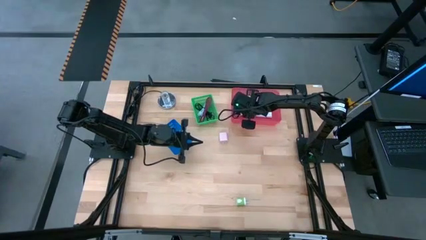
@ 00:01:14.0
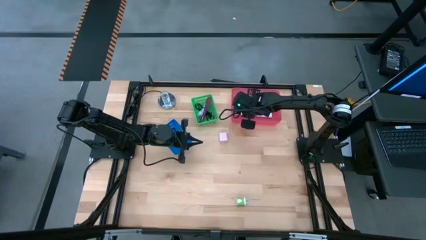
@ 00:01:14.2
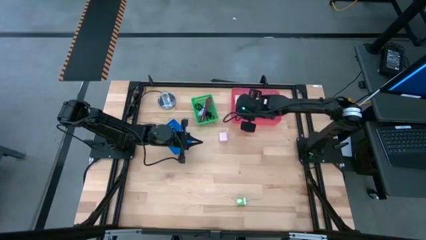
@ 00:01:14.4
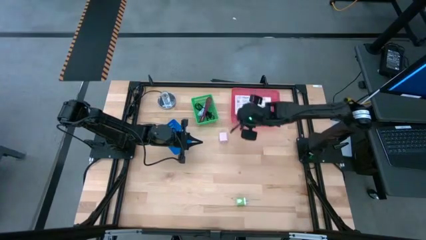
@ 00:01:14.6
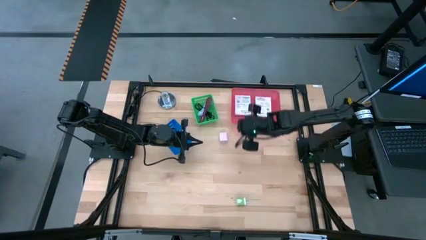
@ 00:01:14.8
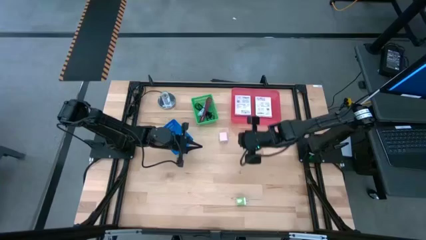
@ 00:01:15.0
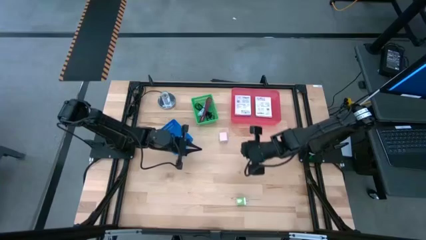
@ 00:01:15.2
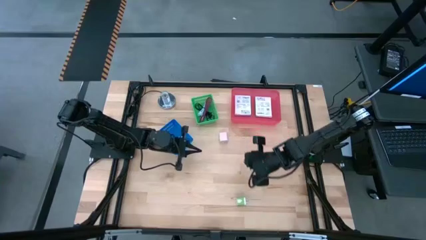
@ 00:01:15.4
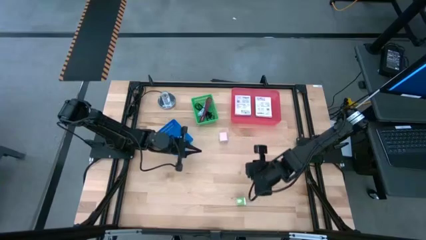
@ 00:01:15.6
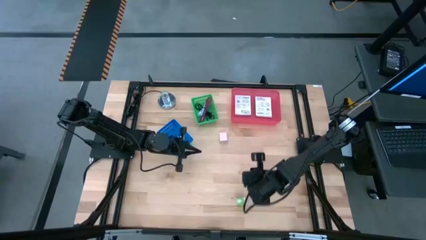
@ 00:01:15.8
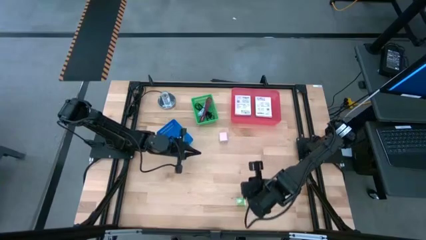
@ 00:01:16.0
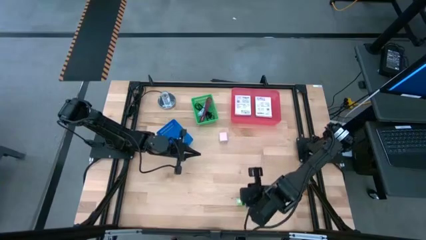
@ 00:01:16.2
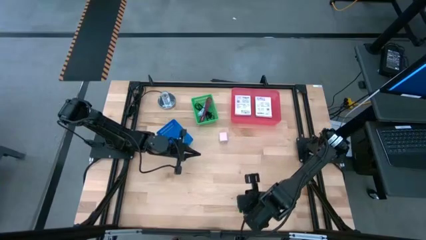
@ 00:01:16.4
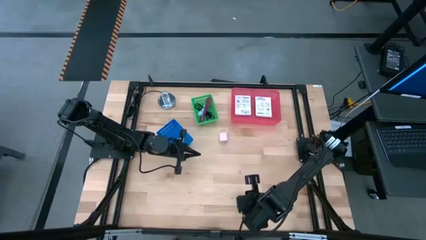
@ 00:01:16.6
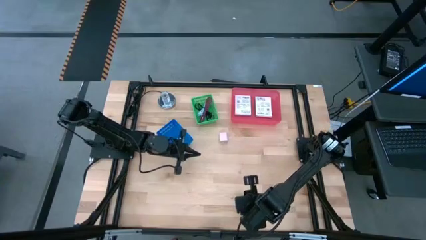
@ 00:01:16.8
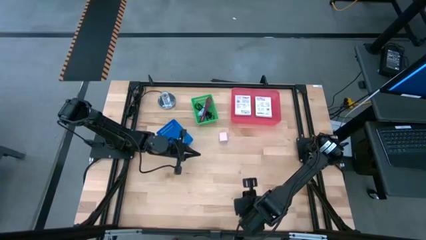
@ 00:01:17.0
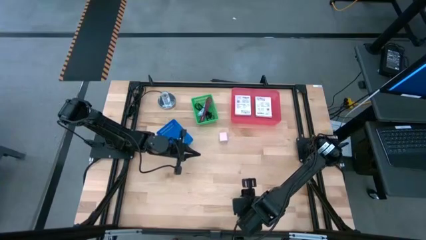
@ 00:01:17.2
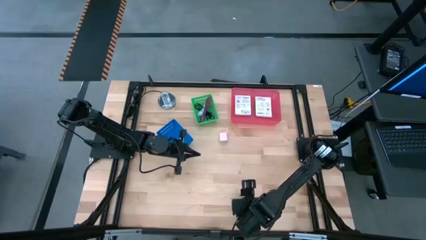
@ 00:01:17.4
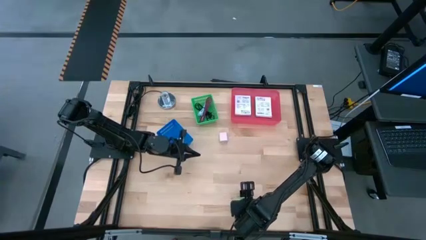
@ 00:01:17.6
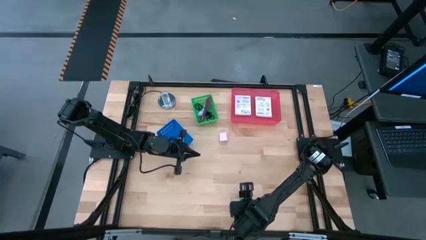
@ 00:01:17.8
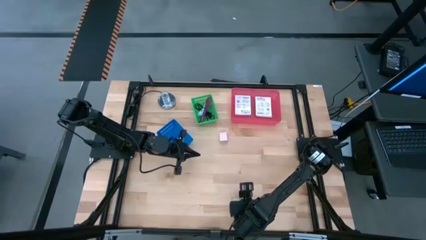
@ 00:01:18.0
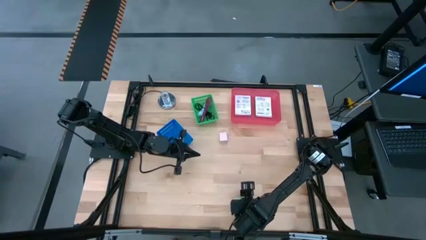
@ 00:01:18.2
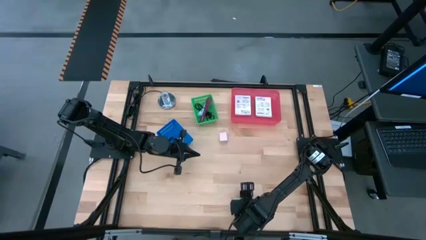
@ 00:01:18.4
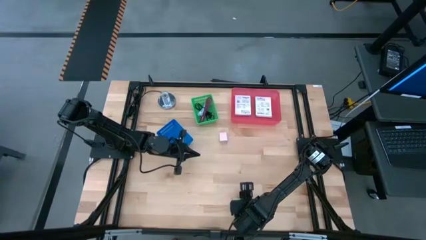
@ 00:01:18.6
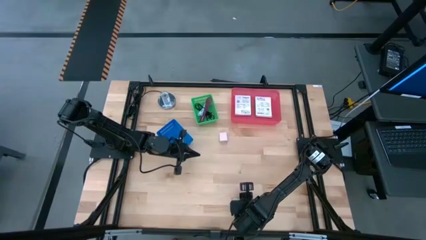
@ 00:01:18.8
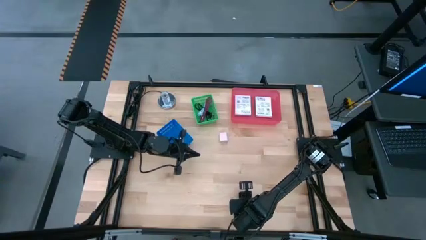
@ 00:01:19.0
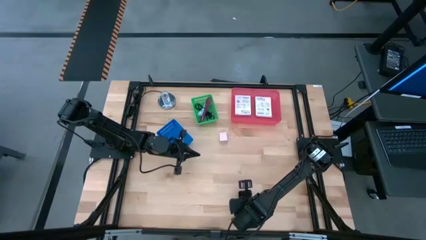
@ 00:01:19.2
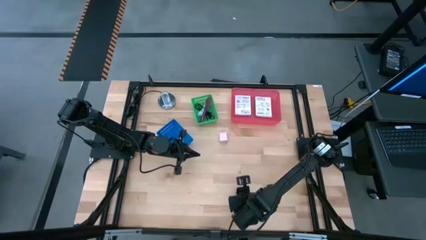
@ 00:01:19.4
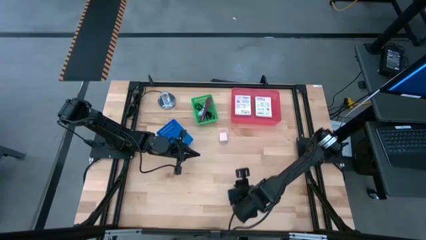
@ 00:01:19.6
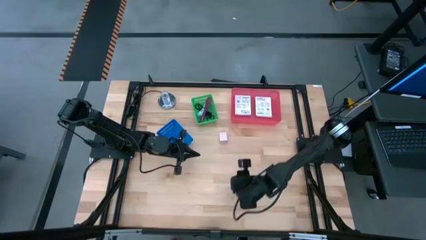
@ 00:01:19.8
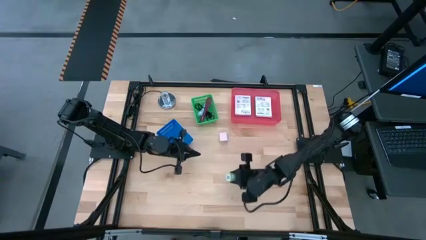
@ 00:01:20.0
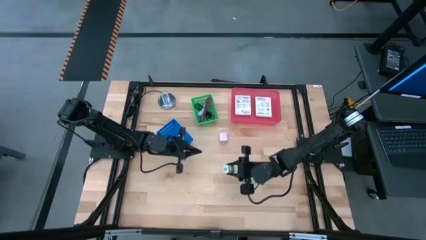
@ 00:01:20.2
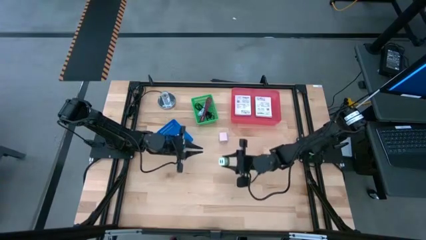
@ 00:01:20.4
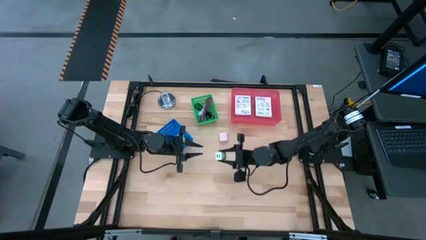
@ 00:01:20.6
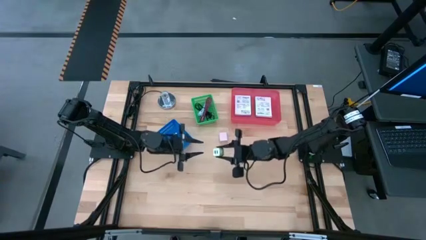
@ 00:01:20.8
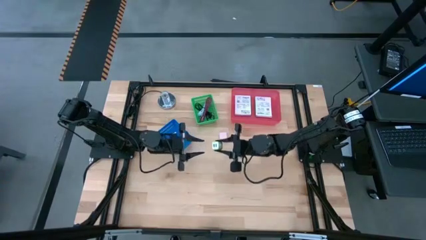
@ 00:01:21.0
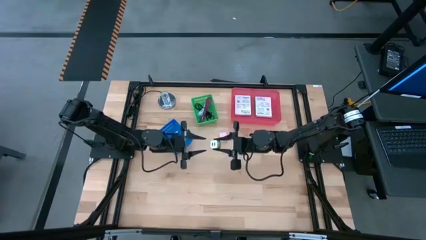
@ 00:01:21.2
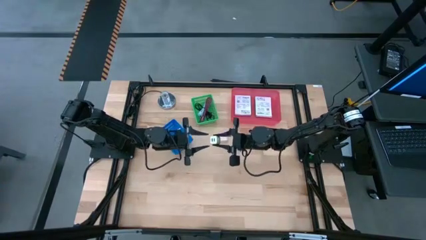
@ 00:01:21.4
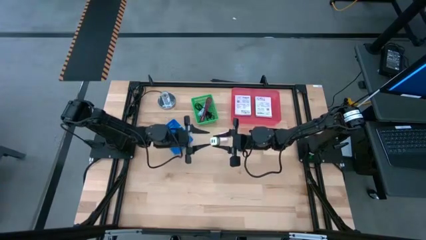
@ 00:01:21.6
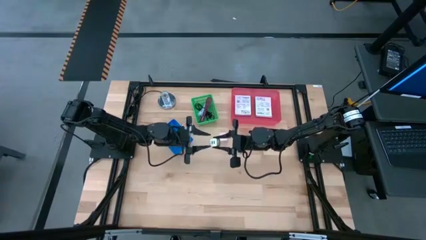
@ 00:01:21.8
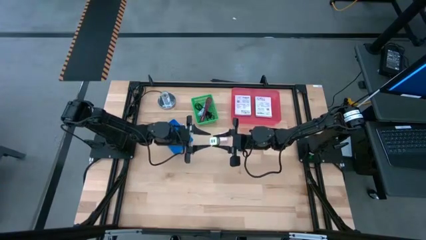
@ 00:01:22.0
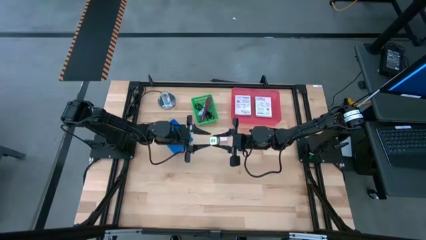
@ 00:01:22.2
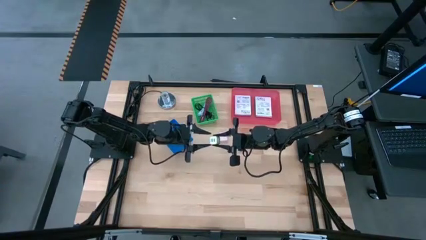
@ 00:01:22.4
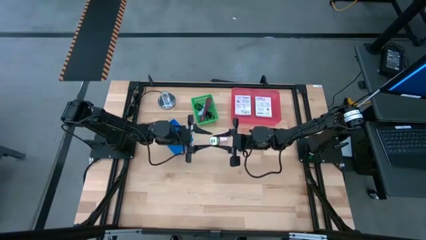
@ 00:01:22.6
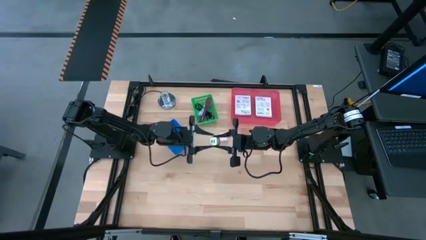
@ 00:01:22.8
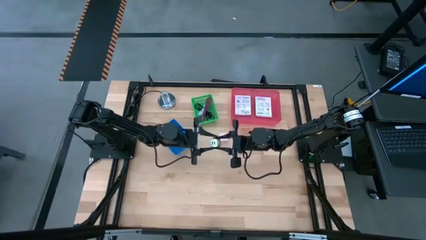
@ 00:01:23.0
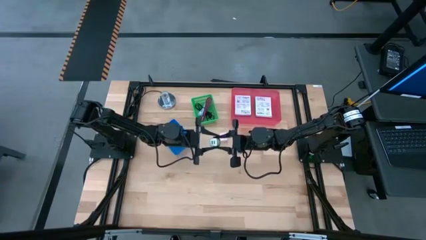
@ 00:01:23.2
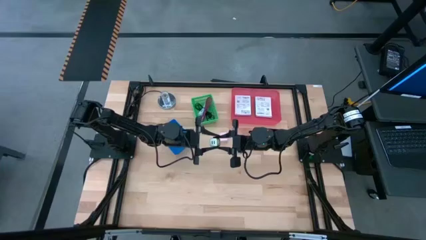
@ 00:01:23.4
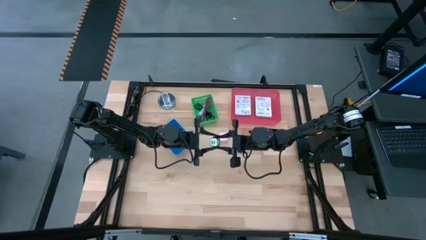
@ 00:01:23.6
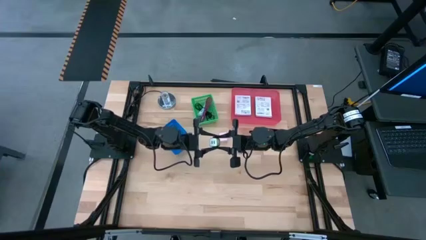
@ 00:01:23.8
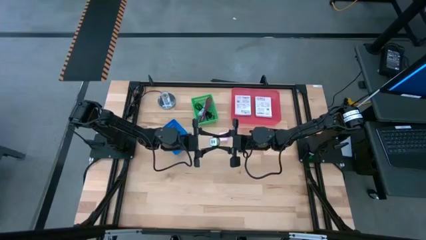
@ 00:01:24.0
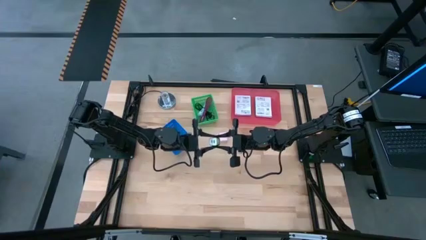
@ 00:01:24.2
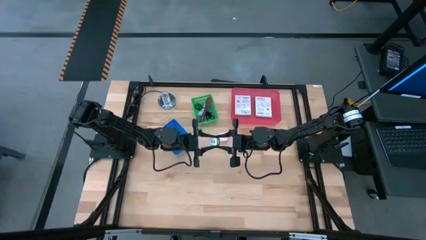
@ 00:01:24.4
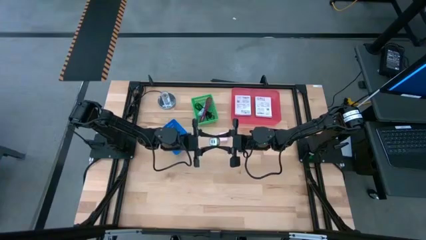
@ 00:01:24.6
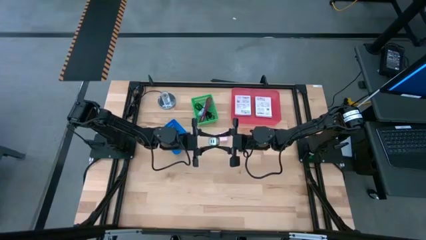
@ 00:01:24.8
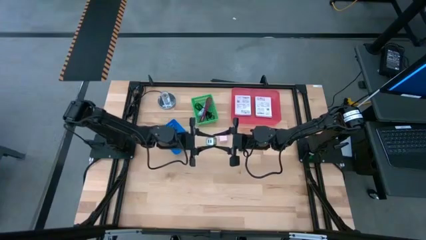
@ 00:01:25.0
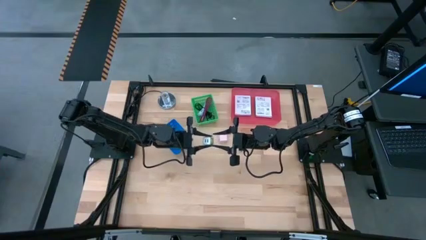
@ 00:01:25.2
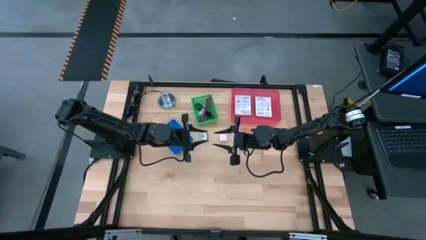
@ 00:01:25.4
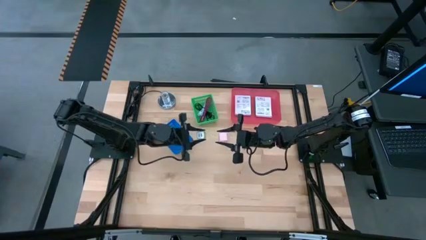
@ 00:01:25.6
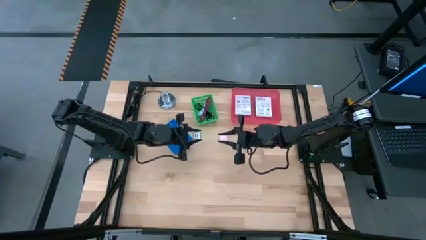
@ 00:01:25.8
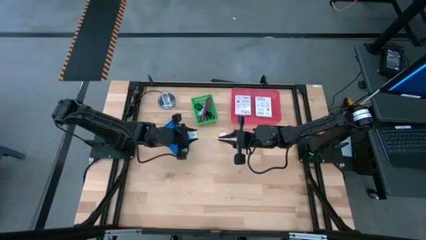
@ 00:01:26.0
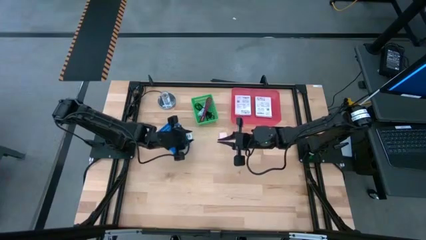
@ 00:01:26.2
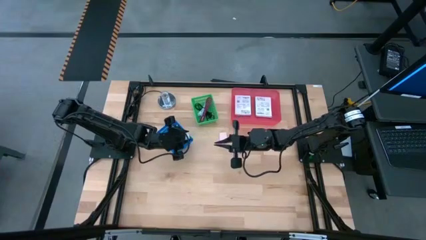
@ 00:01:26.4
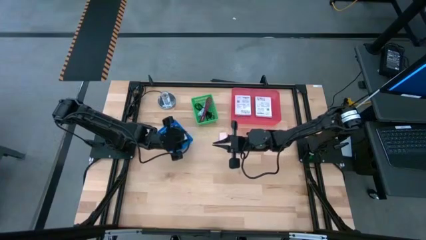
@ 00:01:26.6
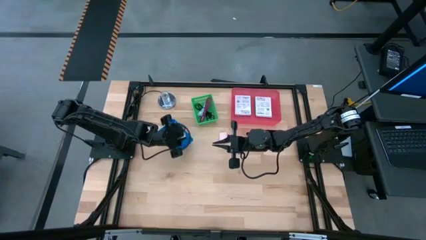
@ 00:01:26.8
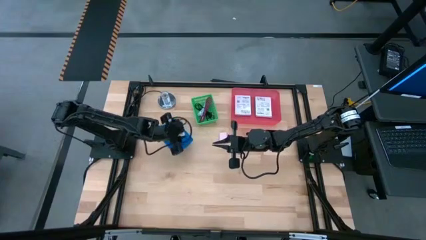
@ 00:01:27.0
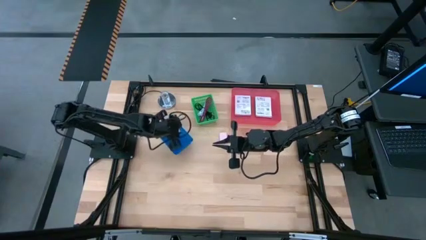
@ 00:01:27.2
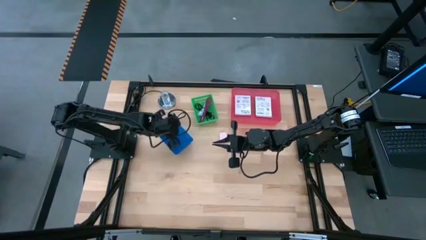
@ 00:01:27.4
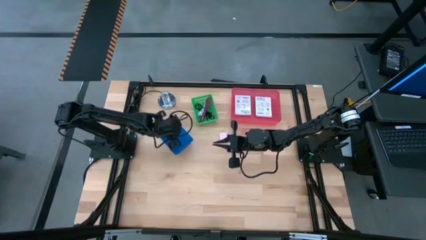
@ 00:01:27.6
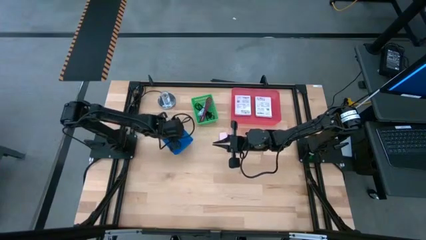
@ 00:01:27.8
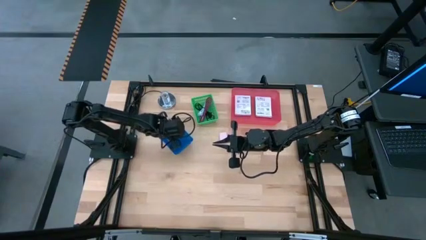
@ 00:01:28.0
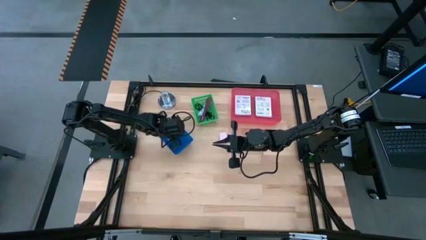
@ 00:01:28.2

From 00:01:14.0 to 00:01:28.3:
Task: Pick and place items into bin
Put the green charger adapter into the blue bin

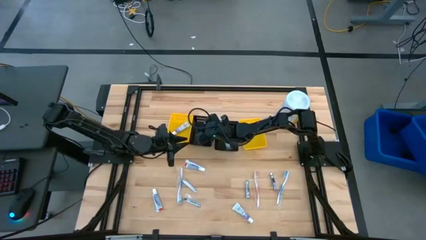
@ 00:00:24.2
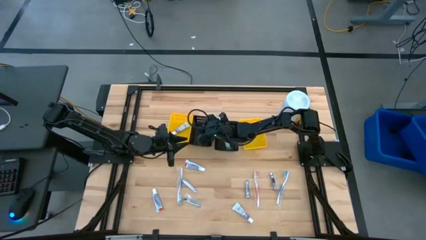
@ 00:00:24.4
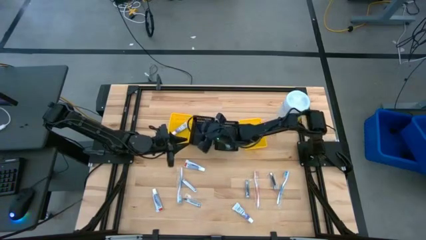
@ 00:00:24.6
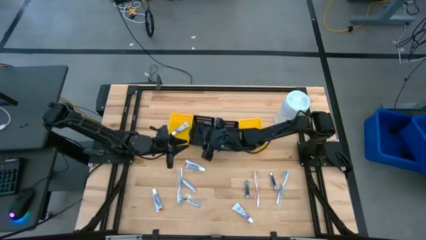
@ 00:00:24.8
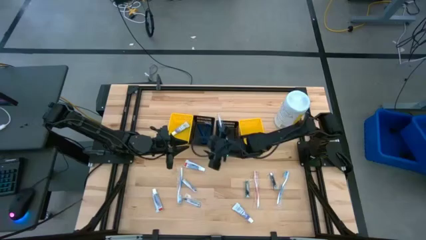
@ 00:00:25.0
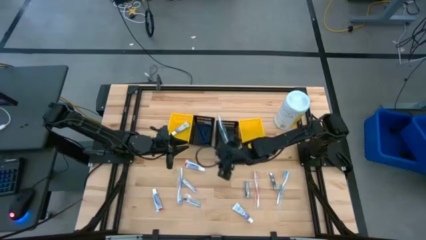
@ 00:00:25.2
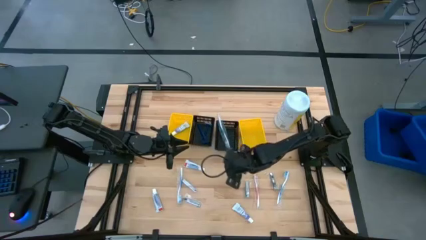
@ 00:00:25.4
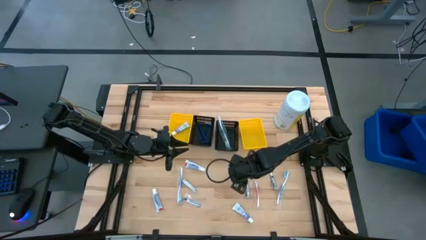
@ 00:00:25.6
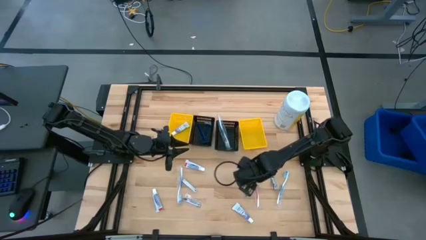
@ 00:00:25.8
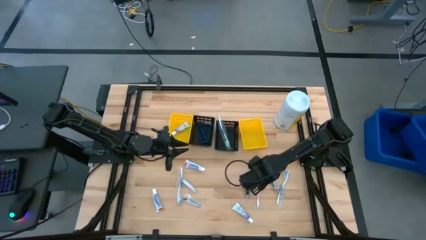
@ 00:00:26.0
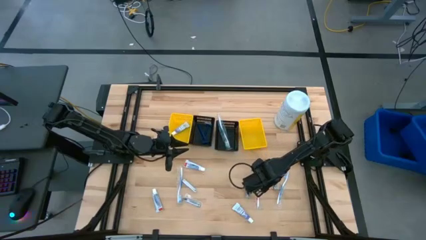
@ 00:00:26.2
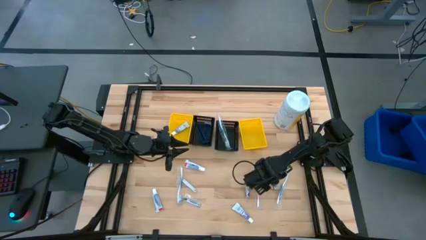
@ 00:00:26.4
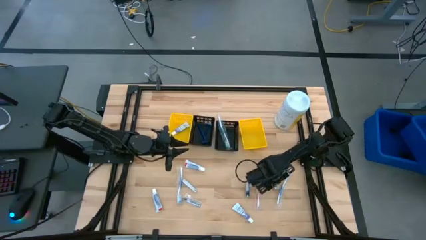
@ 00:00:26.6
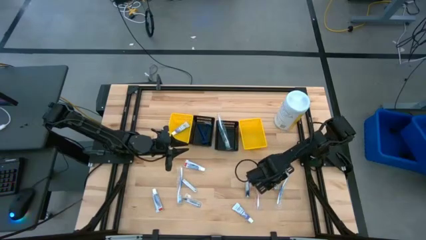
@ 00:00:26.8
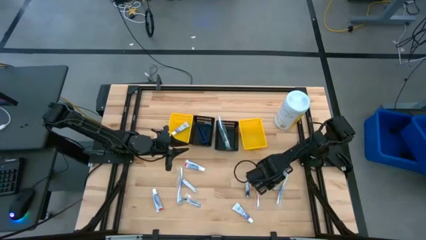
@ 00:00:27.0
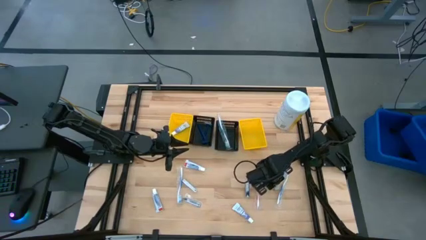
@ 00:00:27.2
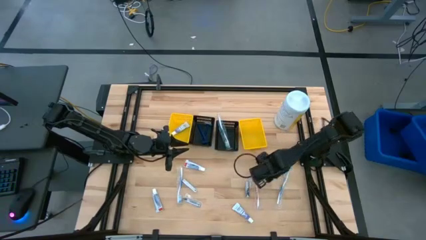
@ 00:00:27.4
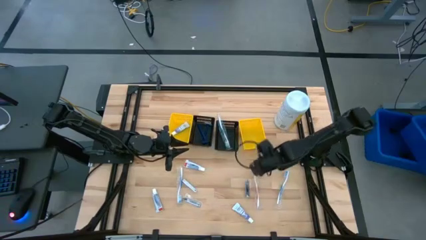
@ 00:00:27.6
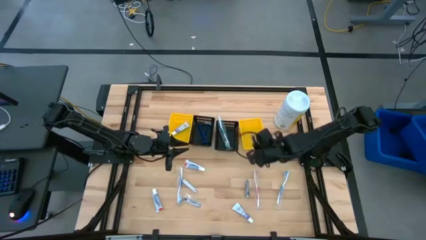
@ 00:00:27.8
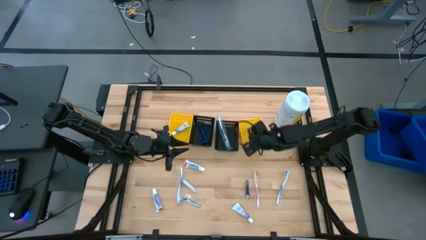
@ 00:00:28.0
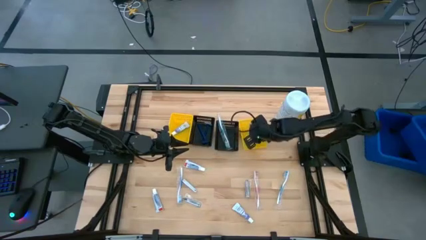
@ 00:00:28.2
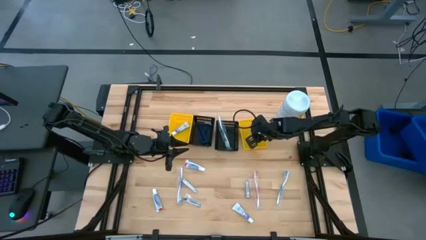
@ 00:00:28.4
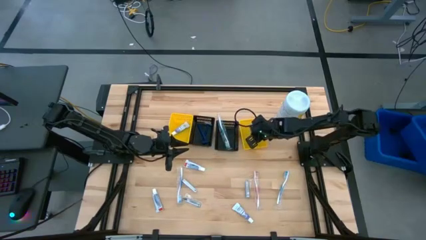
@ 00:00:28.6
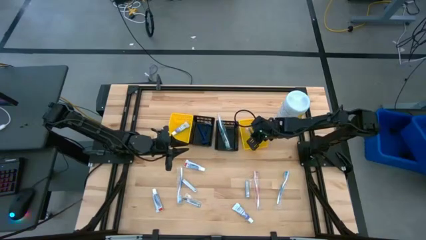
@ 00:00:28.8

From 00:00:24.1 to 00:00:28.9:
Task: Pick & Place Travel size toiletries
Put the silver nail cutter into the right yellow bin
